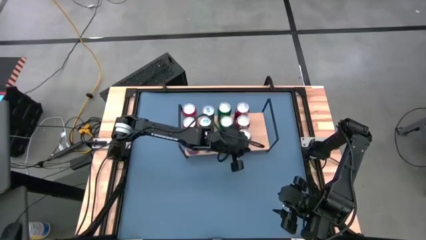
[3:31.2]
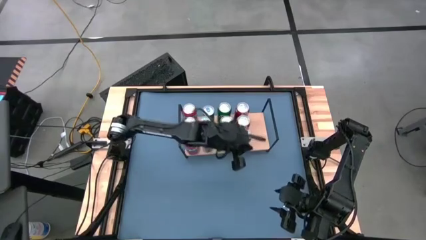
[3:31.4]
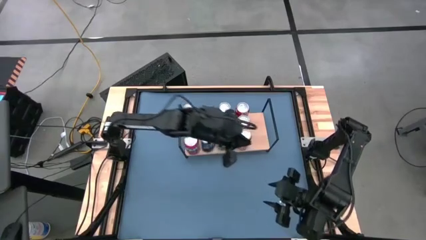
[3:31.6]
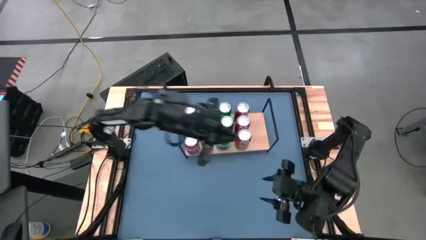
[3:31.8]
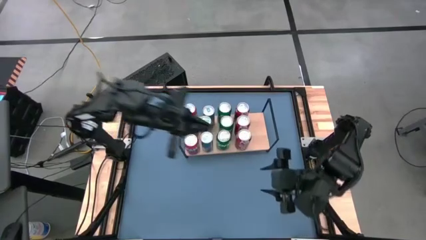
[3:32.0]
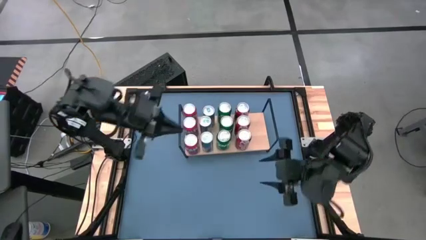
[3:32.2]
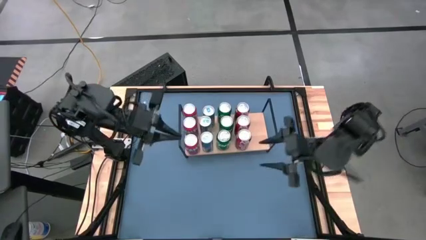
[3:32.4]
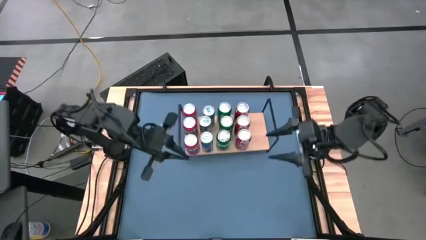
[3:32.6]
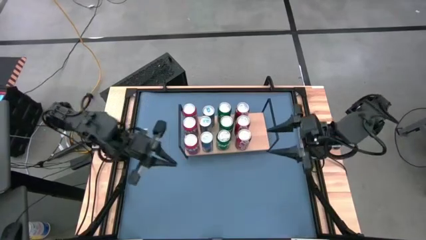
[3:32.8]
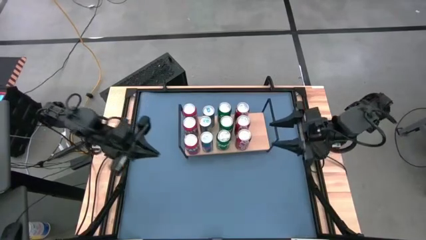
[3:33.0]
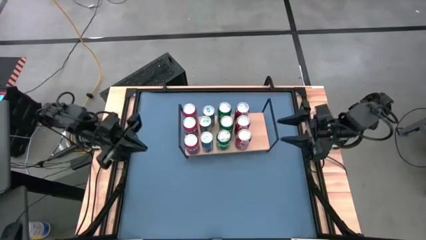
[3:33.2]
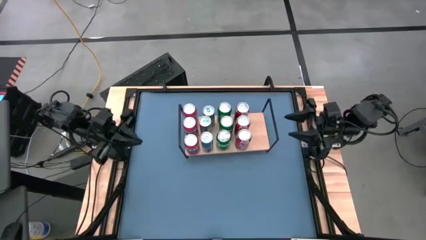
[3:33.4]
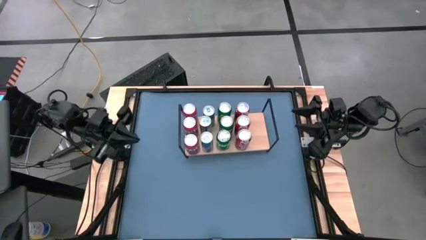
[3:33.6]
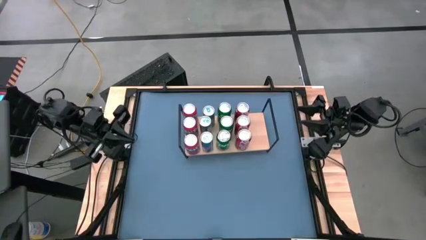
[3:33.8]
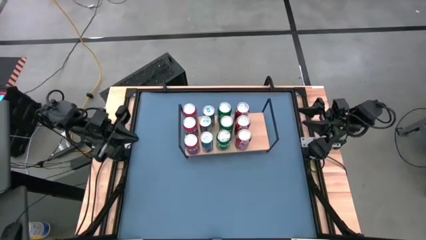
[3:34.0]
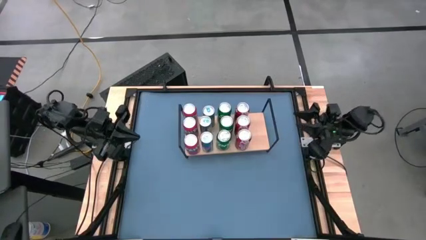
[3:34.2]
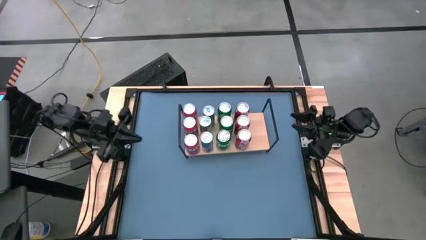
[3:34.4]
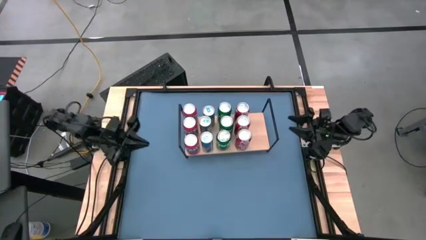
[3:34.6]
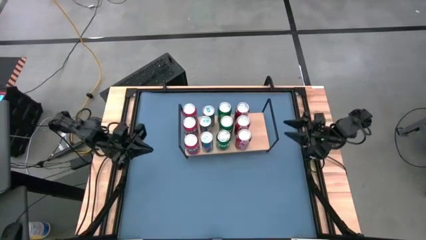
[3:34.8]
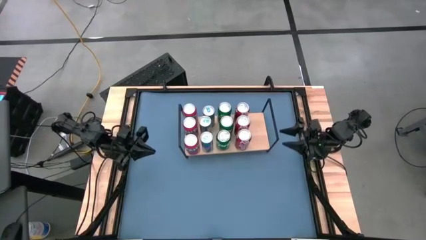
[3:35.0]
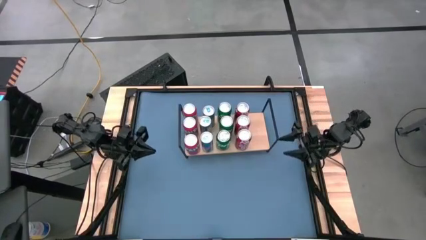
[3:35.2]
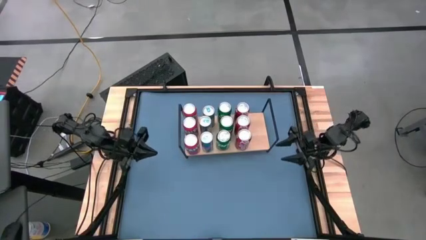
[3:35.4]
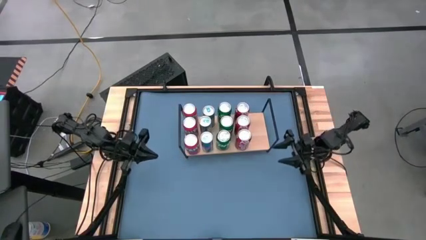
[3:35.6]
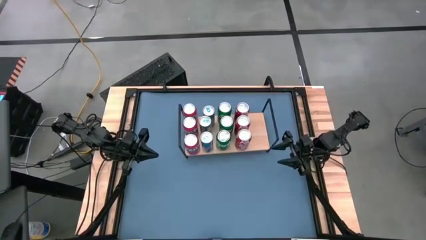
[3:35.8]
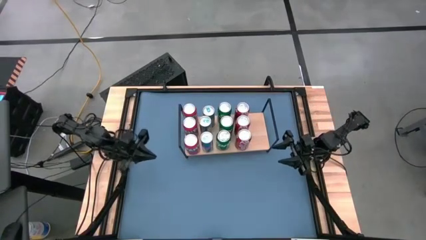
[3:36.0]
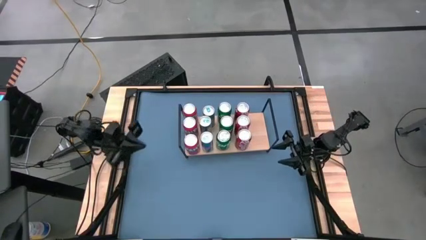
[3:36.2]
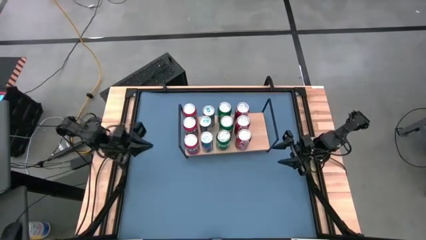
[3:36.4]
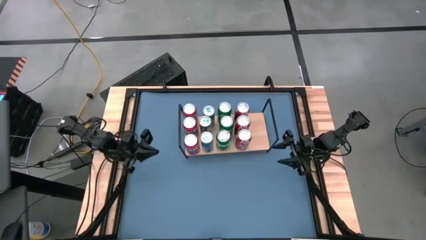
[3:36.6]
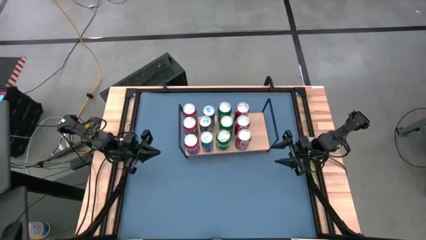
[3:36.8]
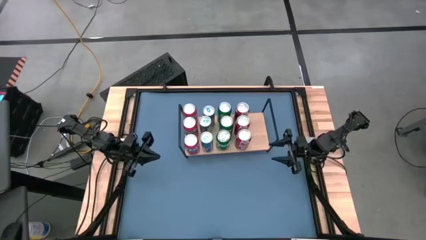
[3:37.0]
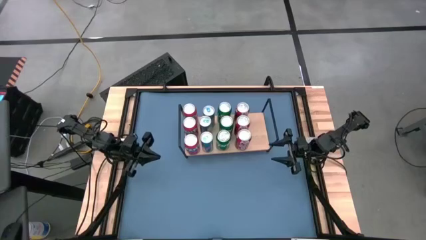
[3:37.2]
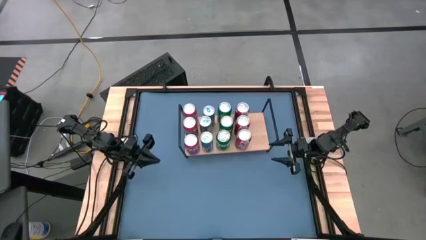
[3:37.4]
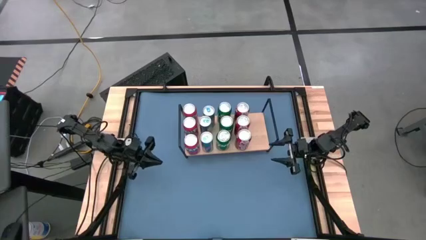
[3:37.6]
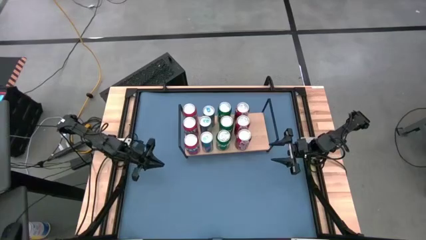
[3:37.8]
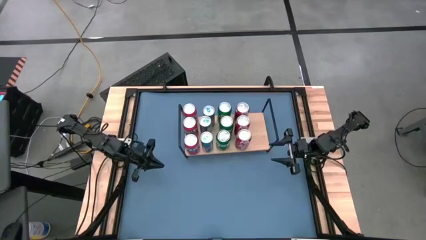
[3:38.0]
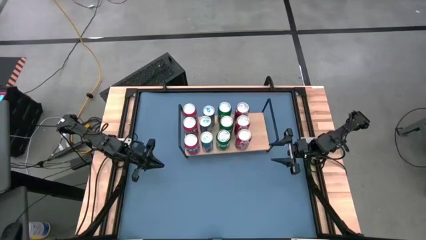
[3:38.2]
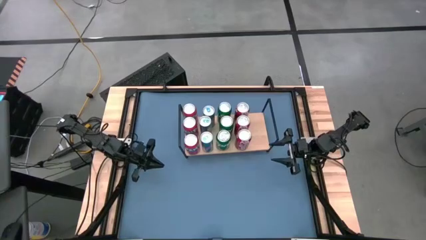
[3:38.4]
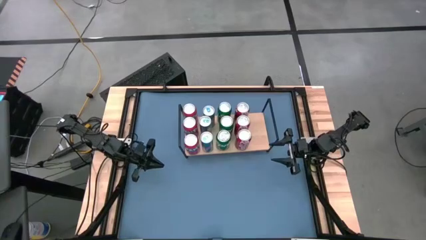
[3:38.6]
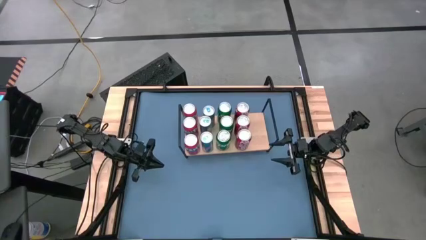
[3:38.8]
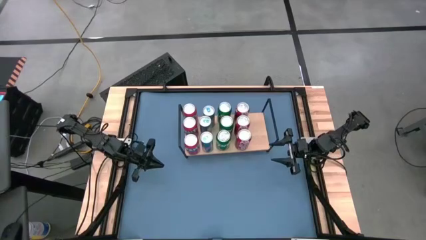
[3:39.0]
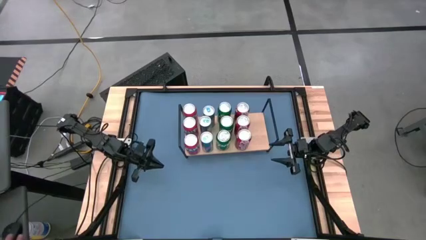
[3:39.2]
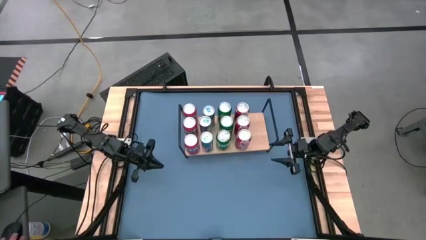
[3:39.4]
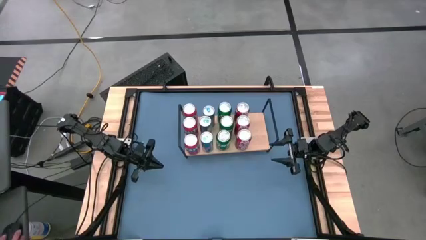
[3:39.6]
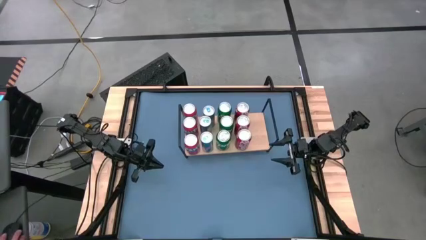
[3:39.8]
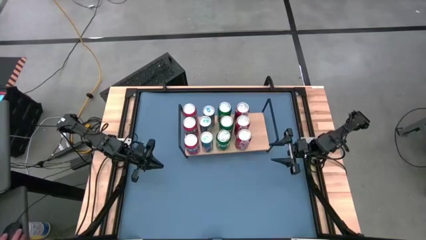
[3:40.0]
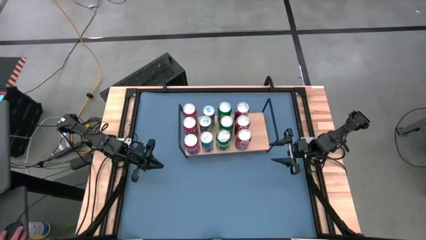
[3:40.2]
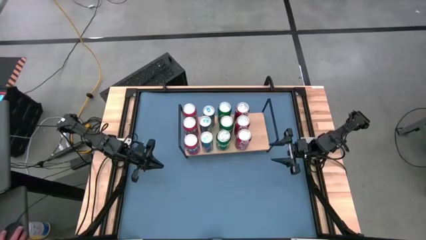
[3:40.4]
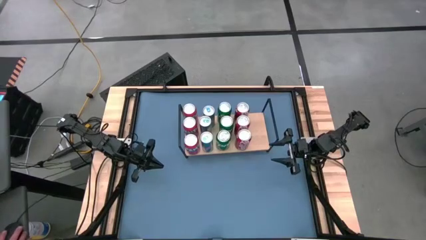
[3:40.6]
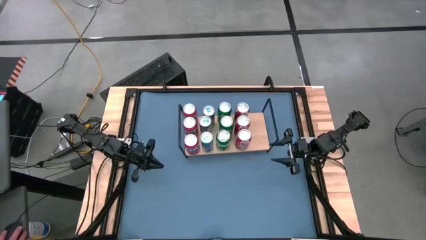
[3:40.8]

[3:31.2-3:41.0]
Task: Place canned beverage on shelf
Return to Home Position
